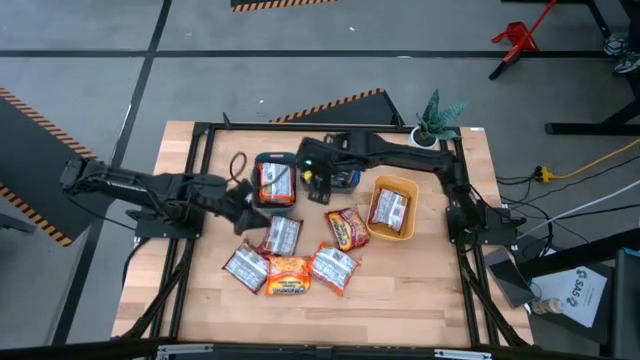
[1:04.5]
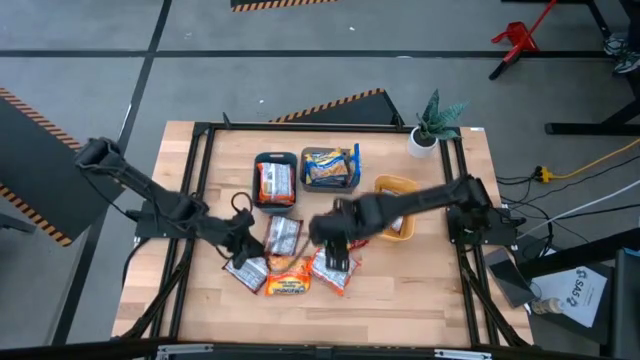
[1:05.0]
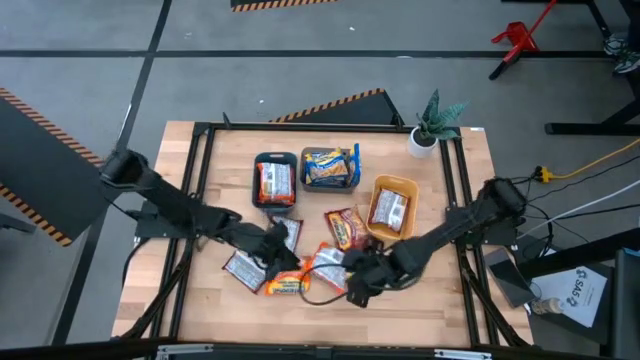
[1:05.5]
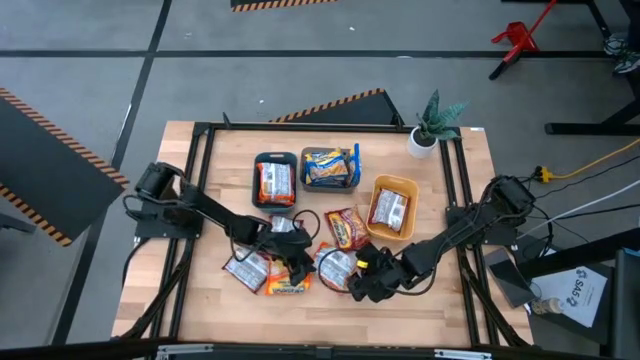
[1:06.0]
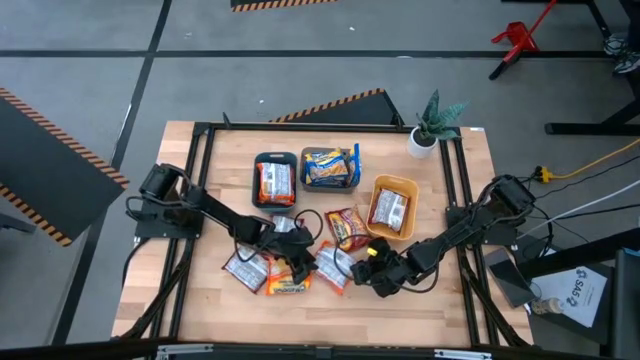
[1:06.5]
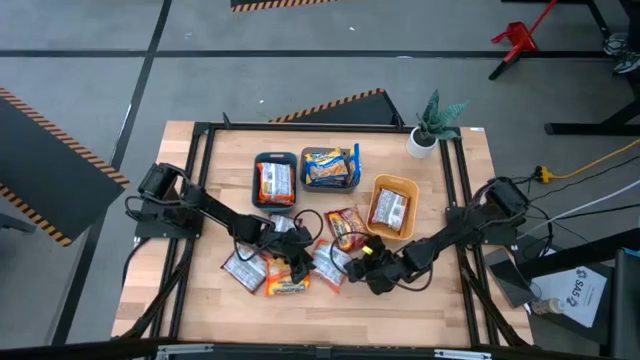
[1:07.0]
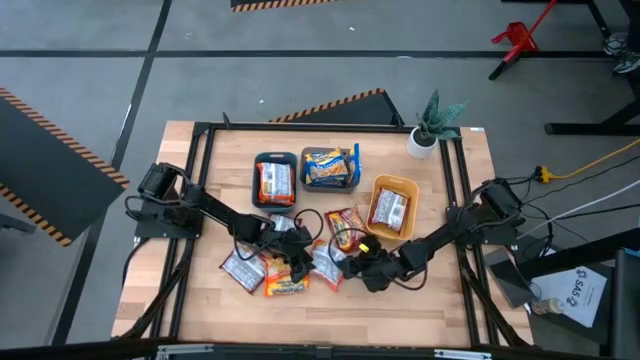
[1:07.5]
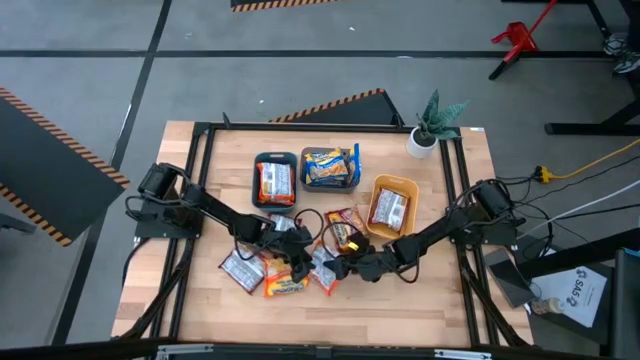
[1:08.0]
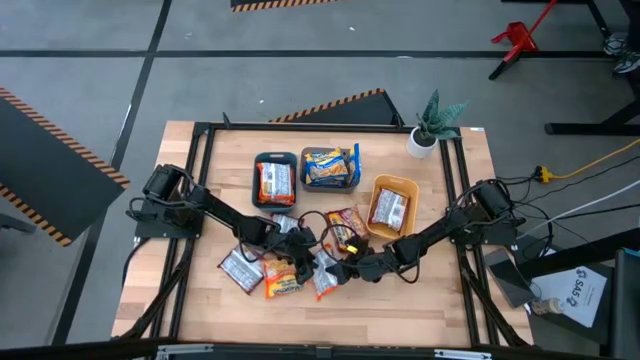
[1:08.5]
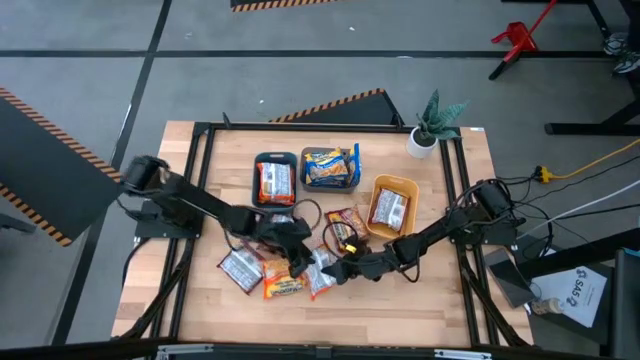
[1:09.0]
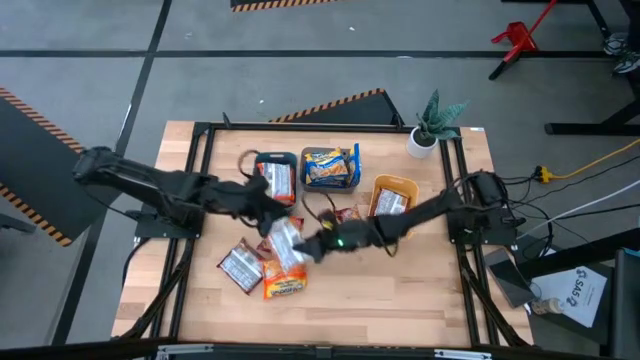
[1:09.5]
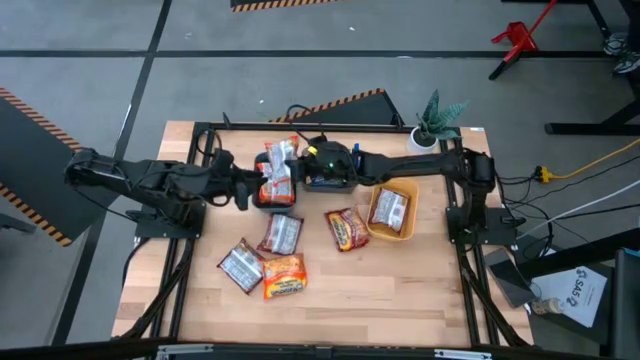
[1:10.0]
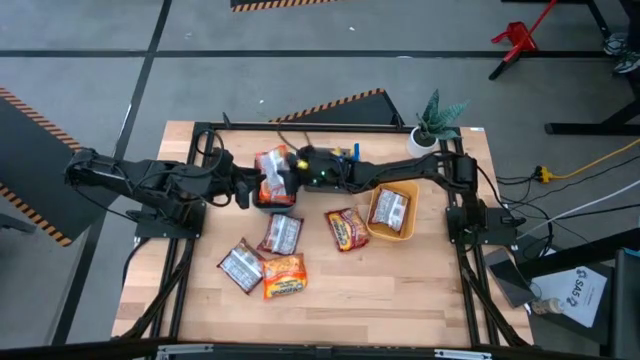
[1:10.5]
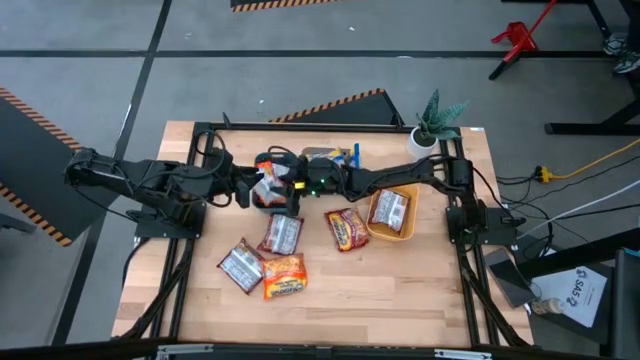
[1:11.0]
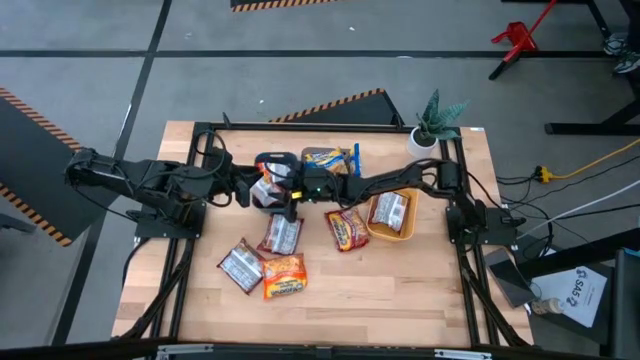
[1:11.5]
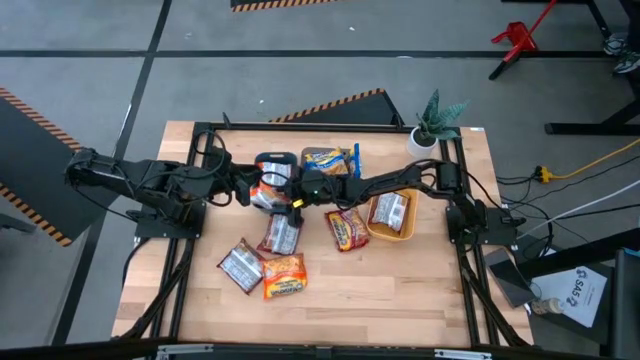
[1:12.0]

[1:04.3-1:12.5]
Task: Sort Maruchan noodles
Put the orange noodle pack into the blue bin

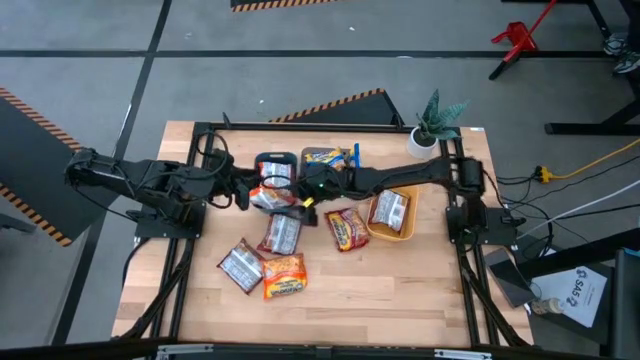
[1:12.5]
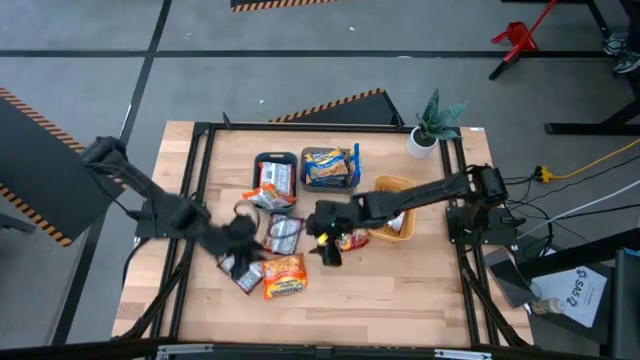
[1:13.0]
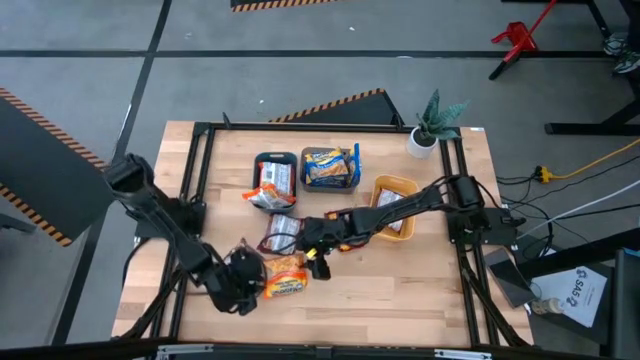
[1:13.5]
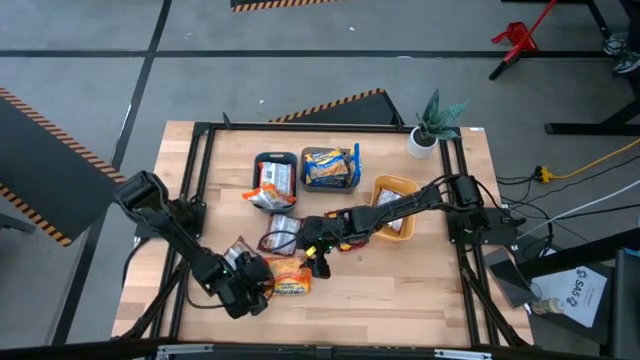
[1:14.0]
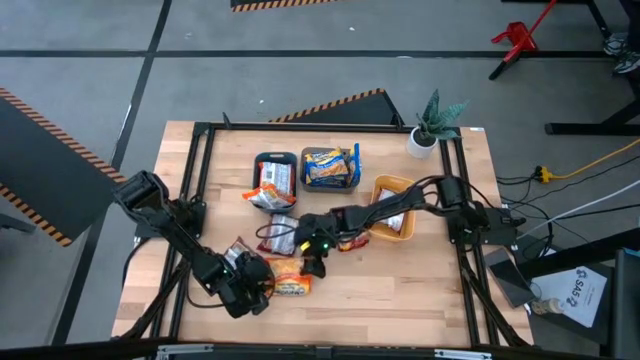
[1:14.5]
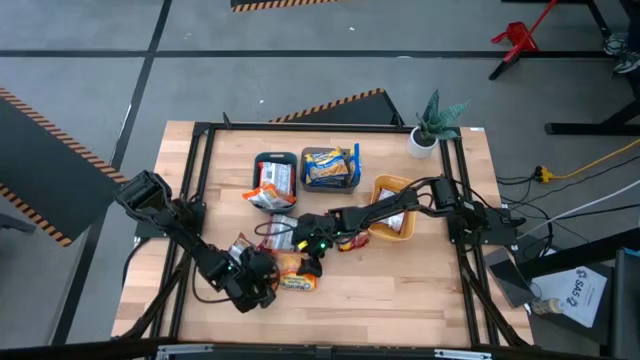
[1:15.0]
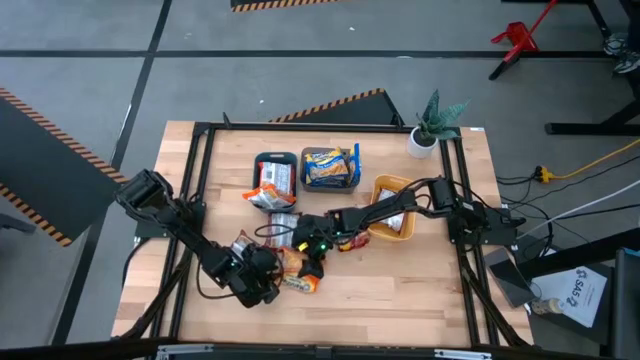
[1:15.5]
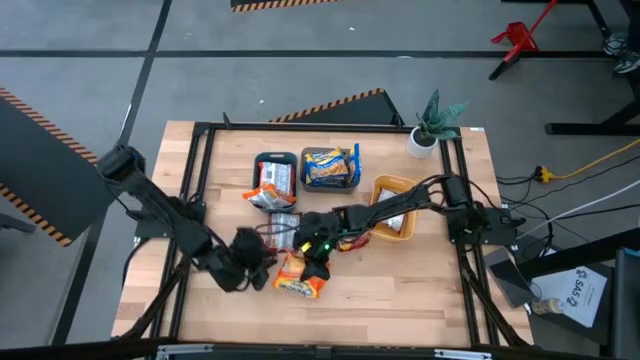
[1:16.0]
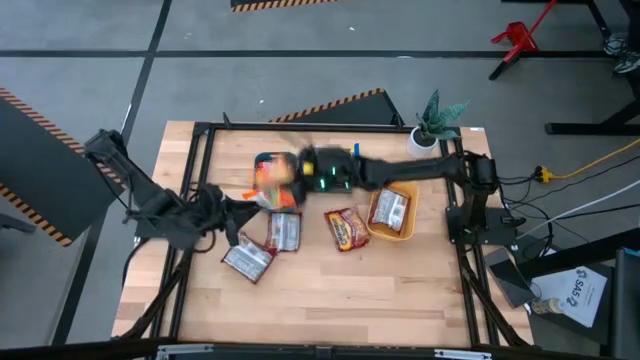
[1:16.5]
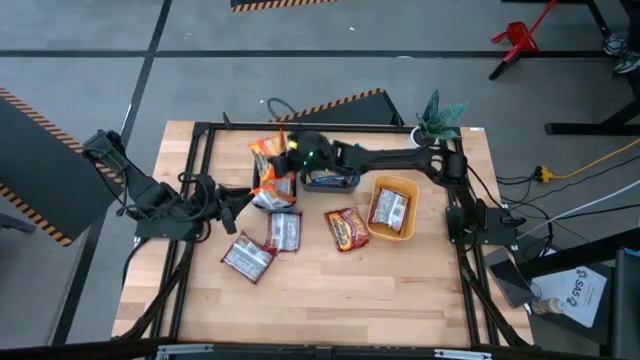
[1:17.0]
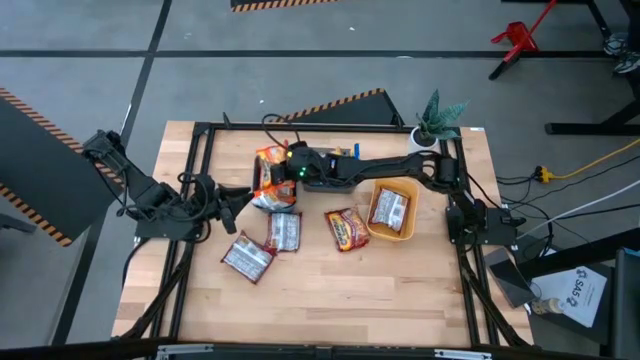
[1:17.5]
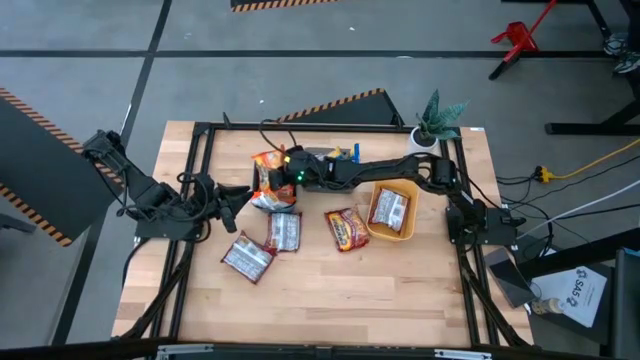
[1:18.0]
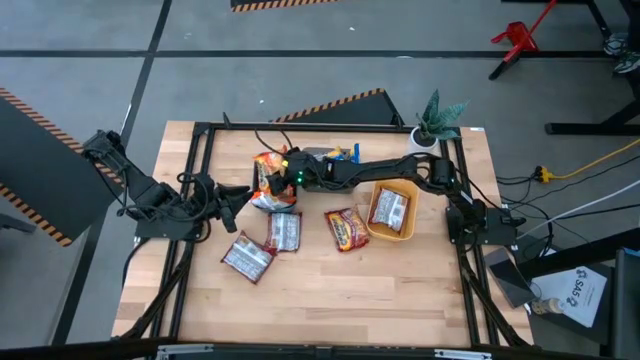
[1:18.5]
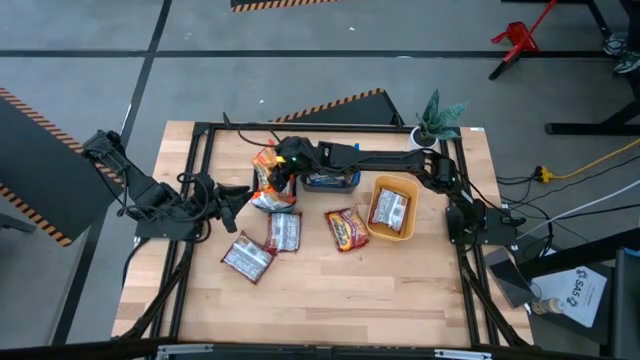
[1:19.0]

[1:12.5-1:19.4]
Put the orange noodle pack into the blue bin

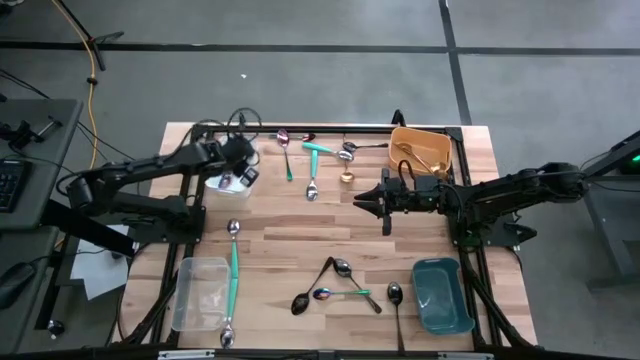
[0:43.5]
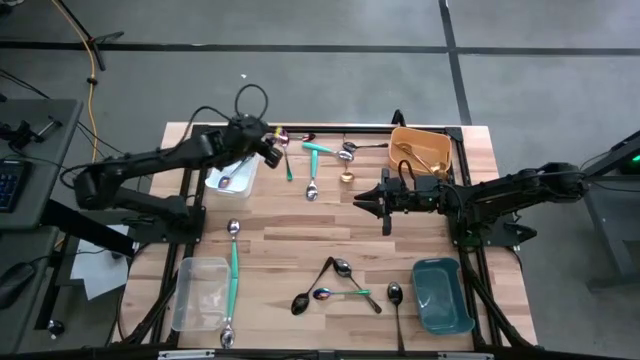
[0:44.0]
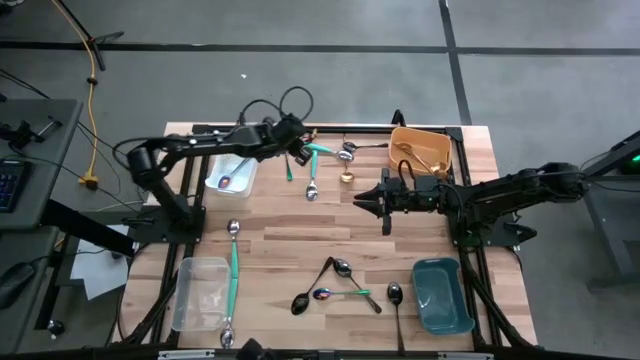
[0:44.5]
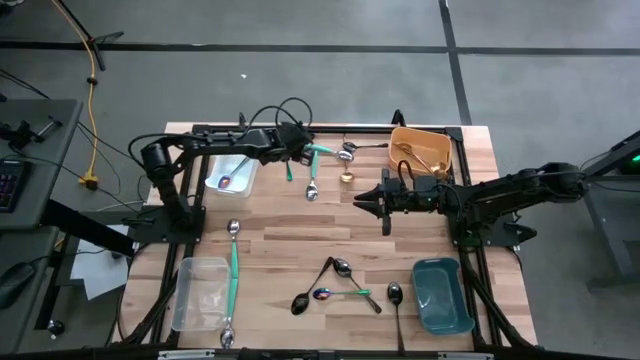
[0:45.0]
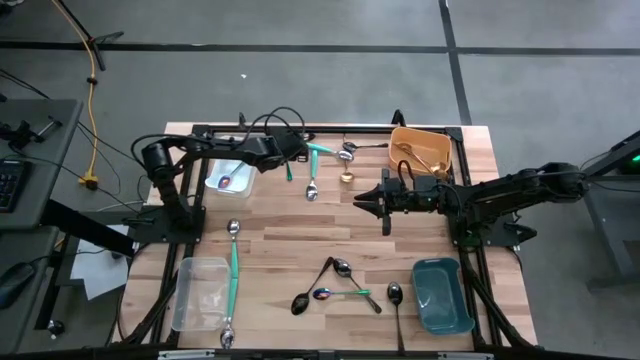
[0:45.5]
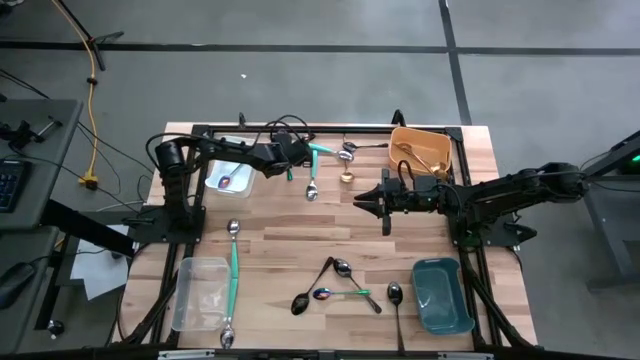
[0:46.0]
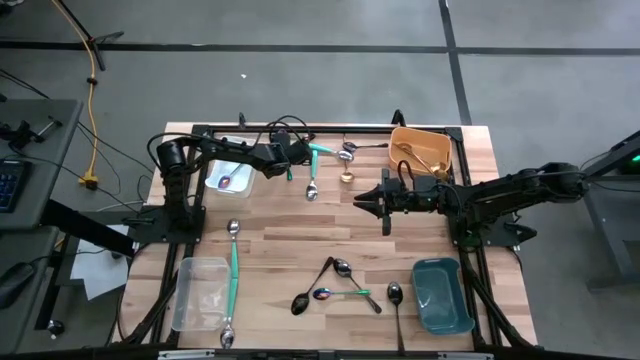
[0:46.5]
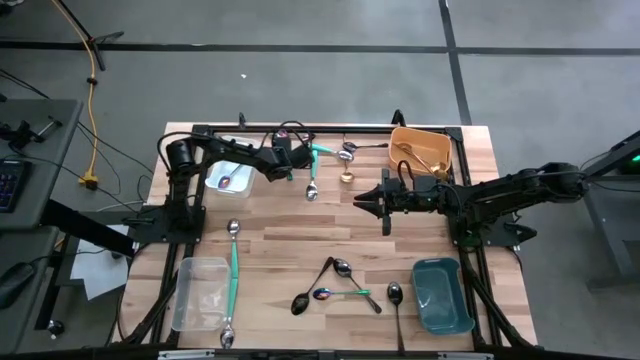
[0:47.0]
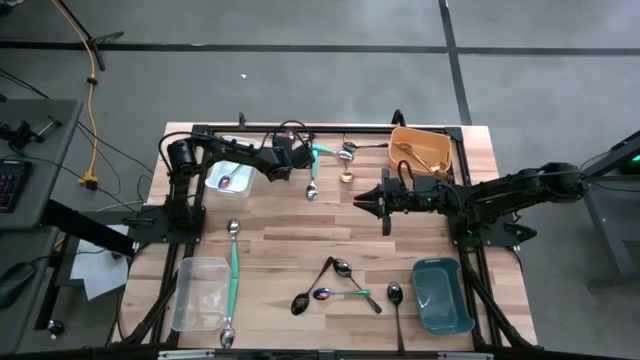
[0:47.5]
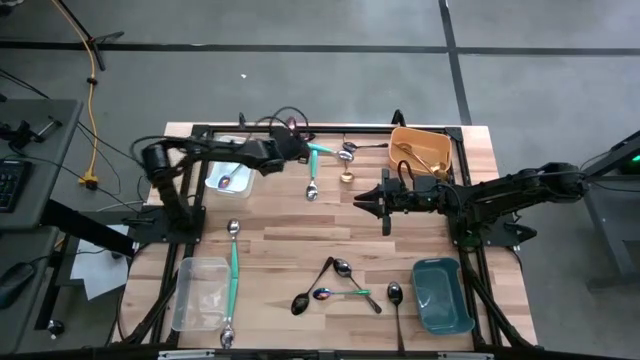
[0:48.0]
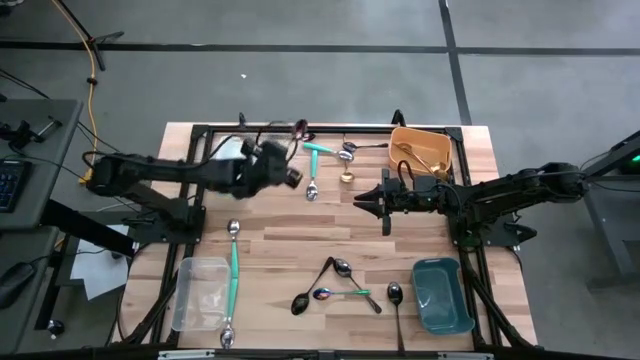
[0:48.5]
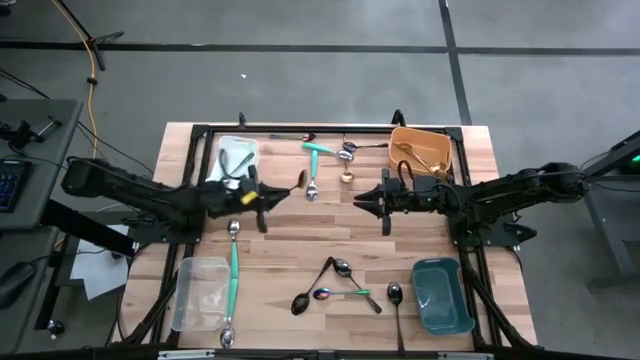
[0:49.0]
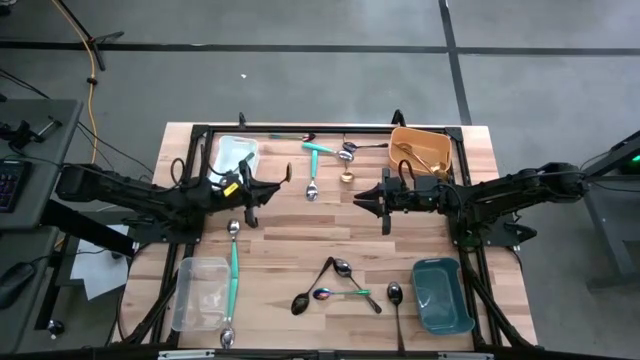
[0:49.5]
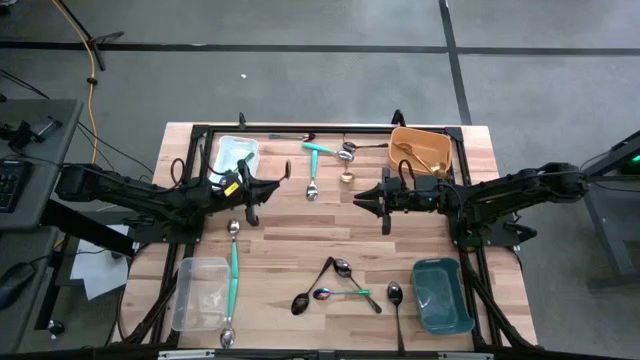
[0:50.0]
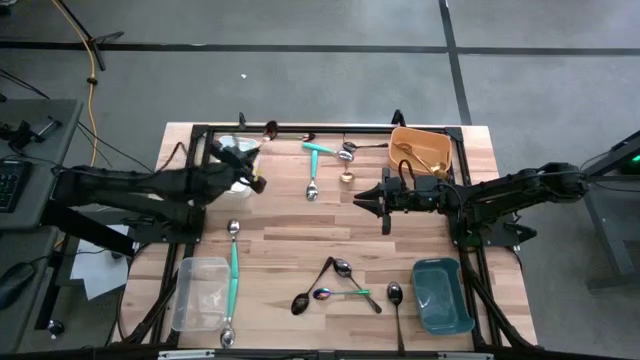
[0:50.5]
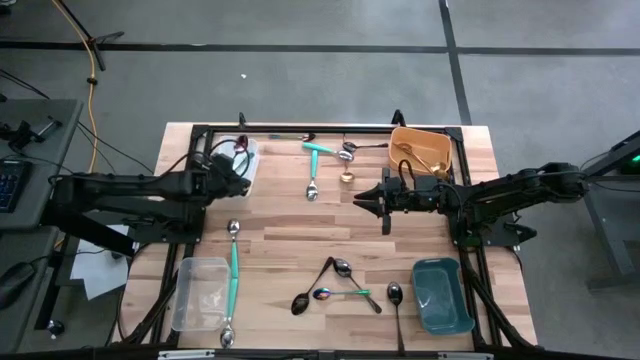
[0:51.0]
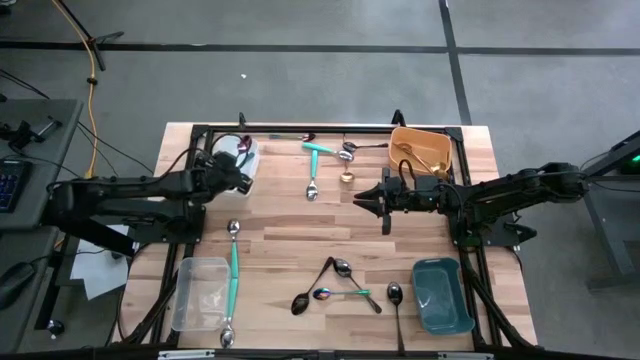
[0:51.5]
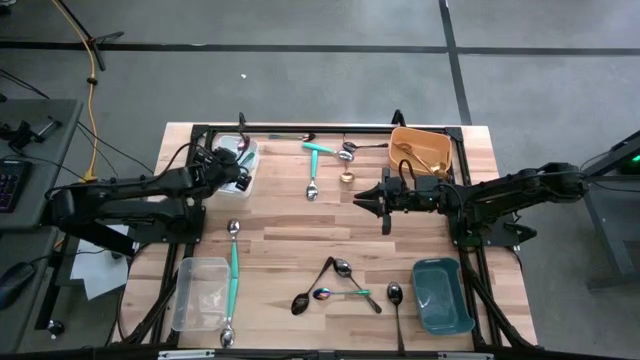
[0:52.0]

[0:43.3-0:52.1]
Task: Sort silverware by color (type)
Put the violet spoon into the white bin
